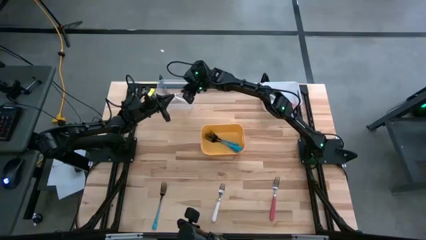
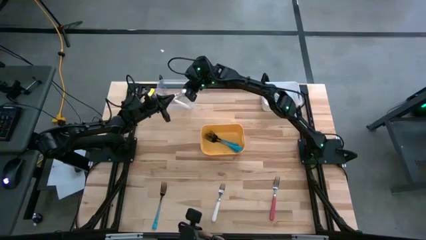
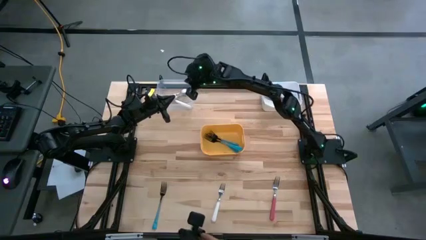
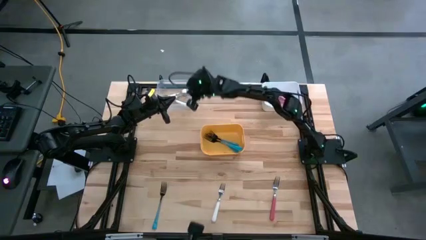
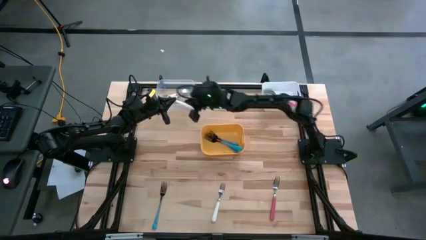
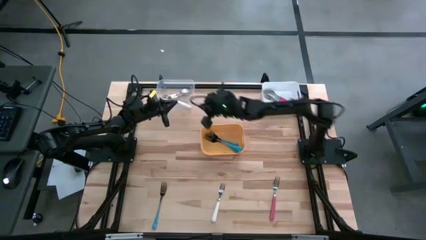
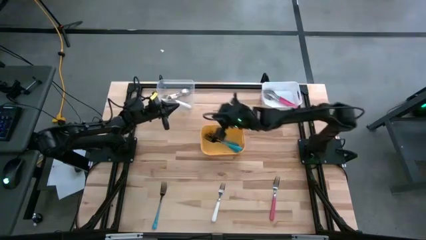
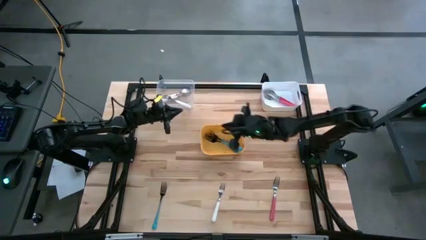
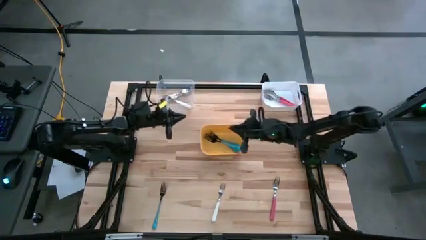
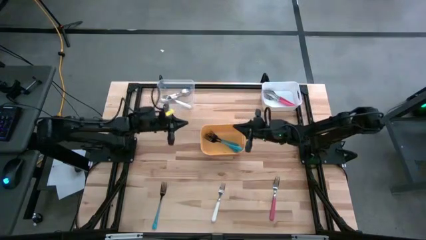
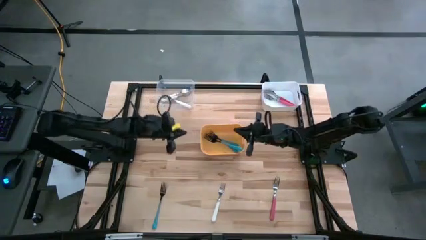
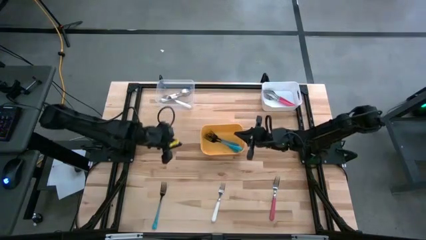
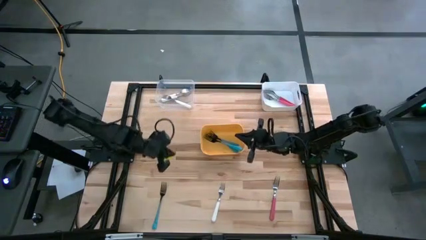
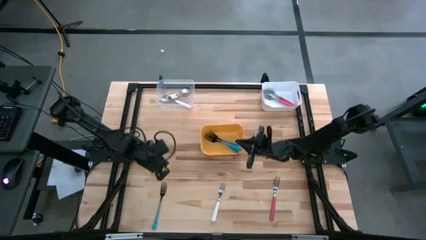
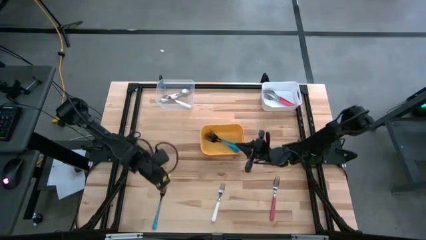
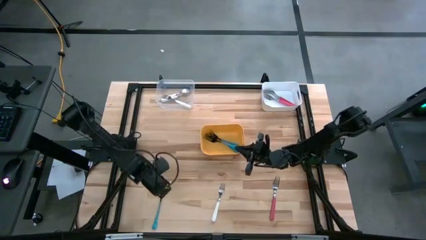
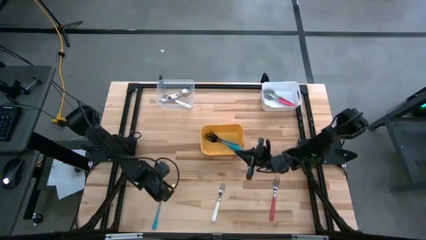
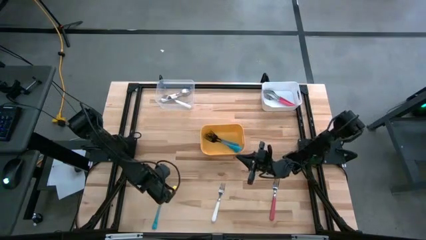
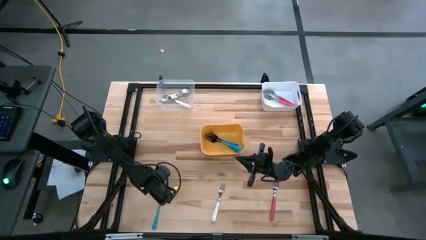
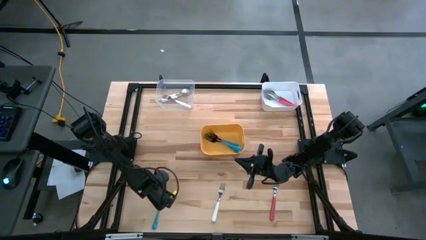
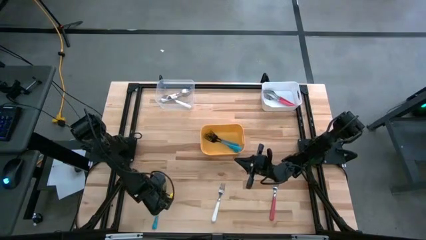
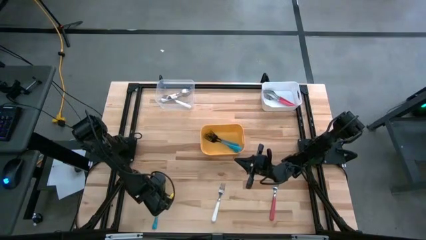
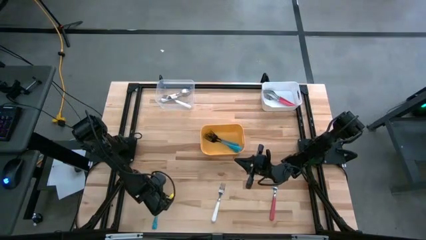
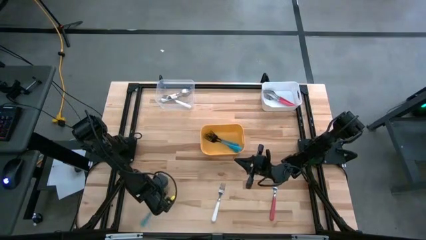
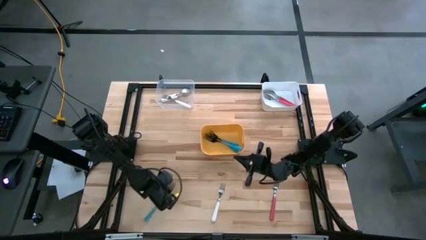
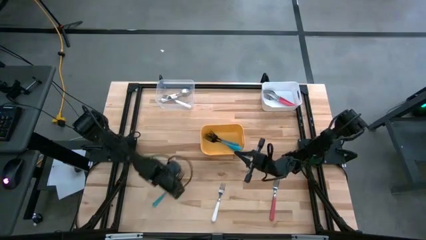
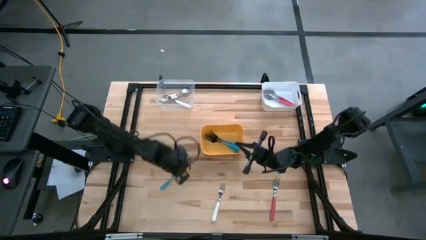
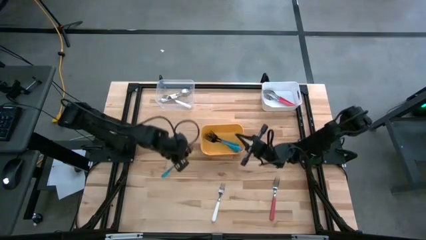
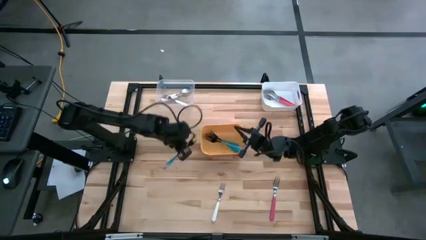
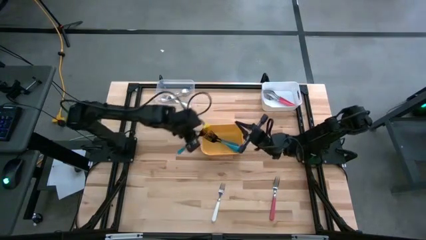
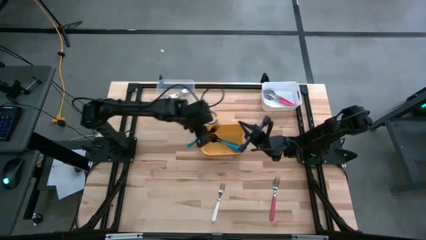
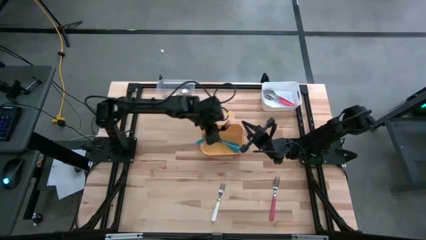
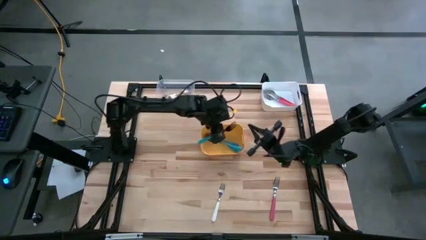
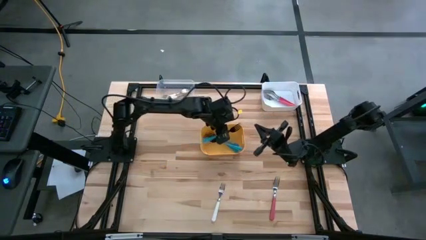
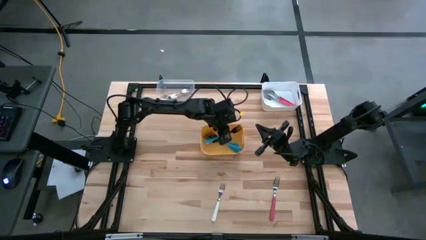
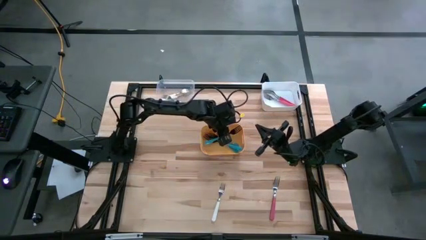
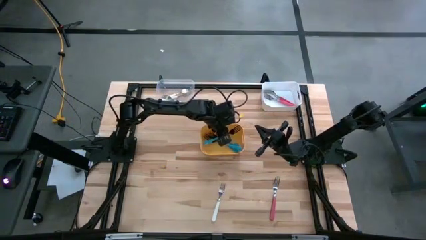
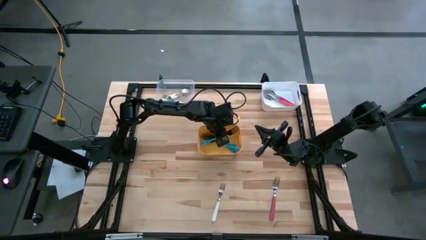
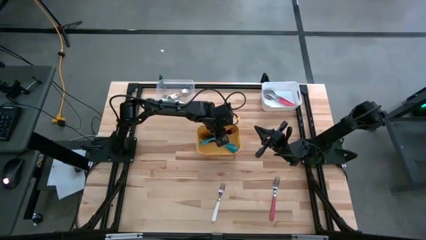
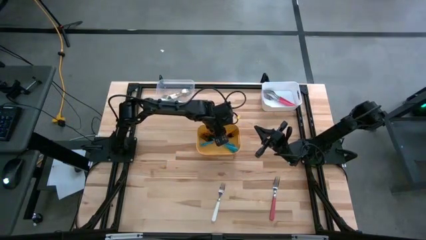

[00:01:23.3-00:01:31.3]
Task: Sort silverware by color (type)
Put the blue fork into the yellow bin

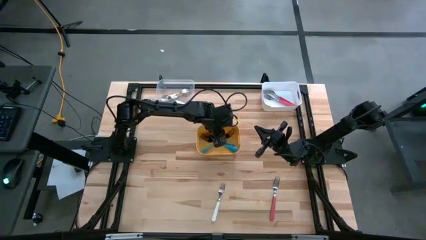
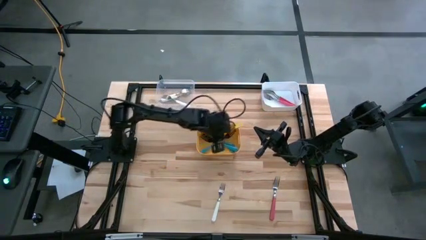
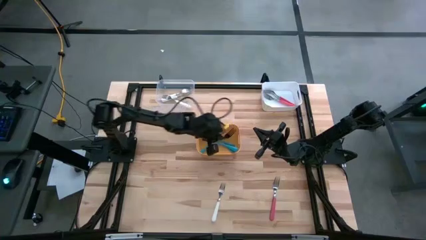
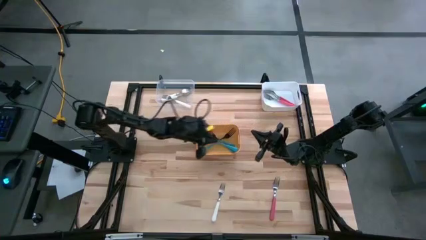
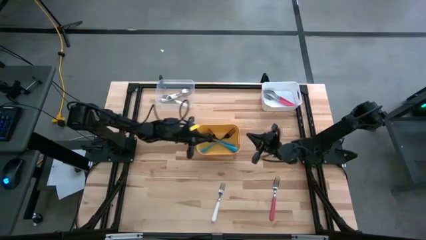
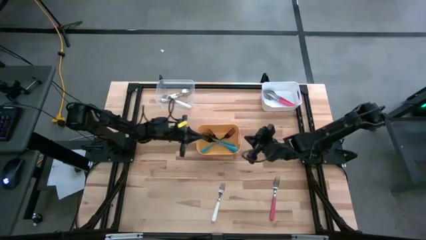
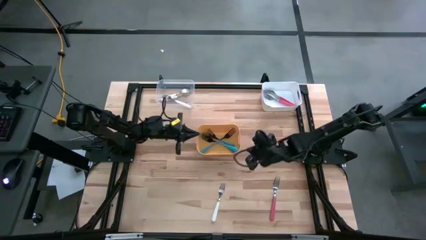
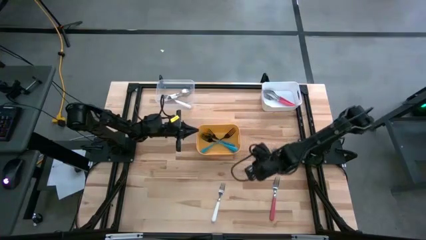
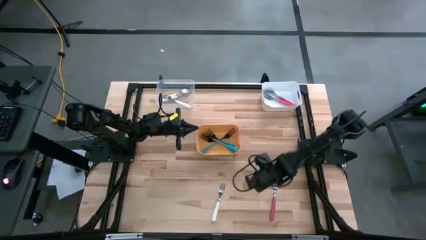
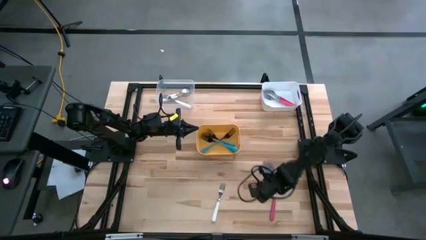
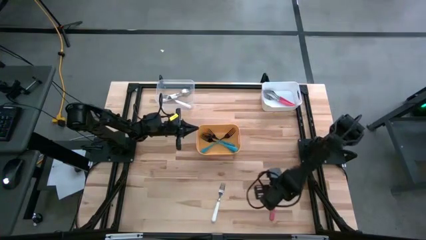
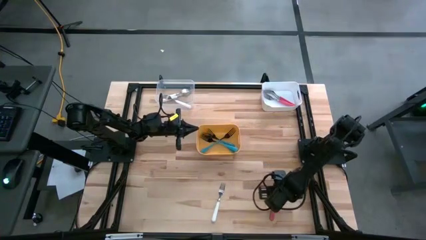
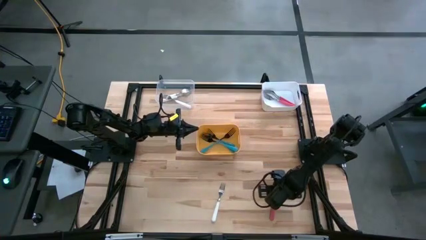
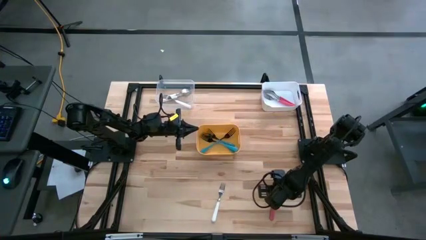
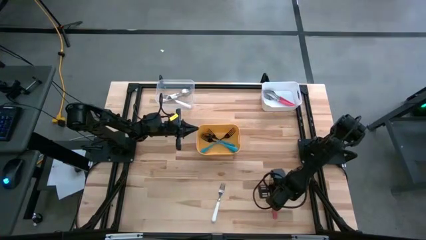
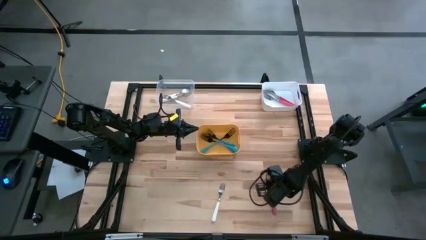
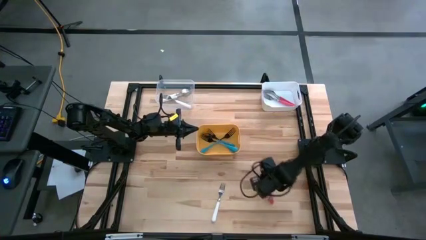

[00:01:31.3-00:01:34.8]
Put the pink fork into the white bin

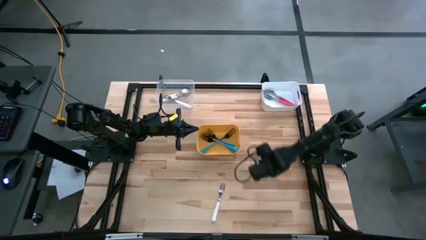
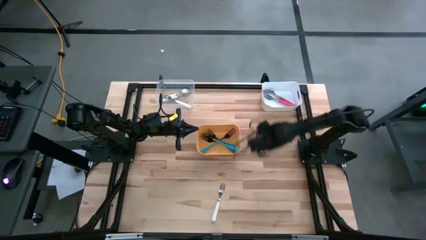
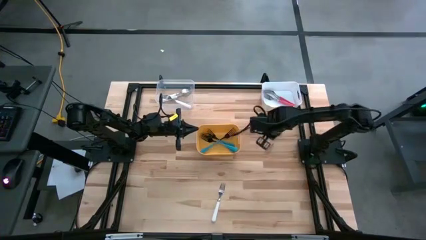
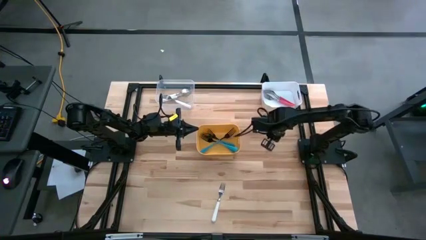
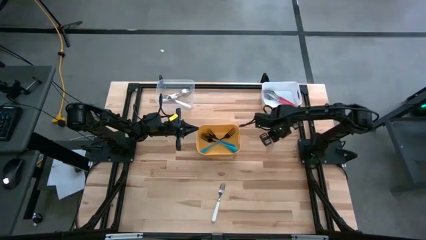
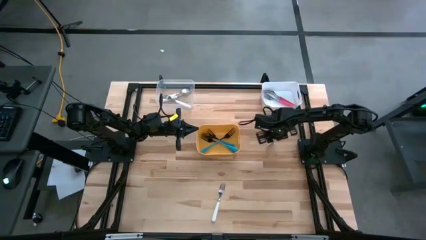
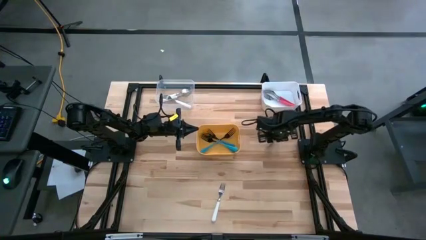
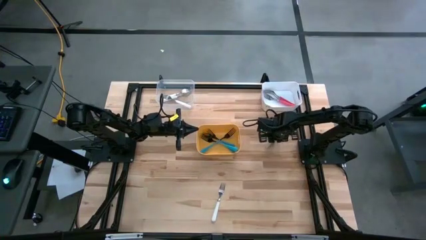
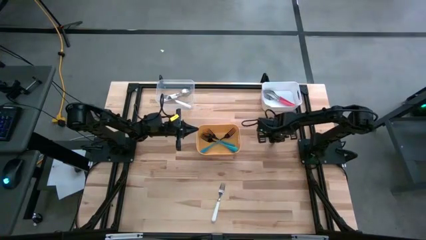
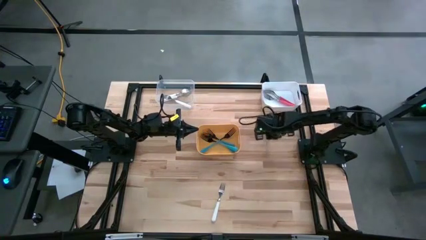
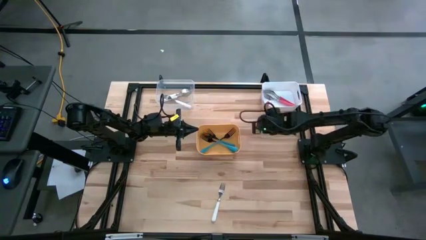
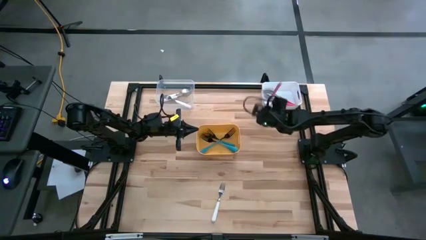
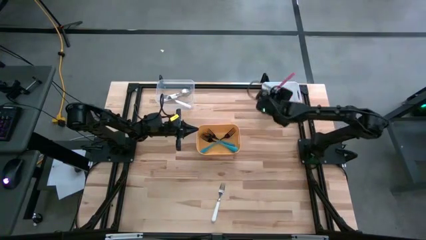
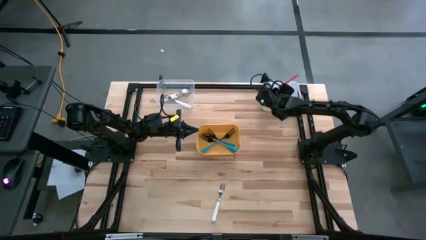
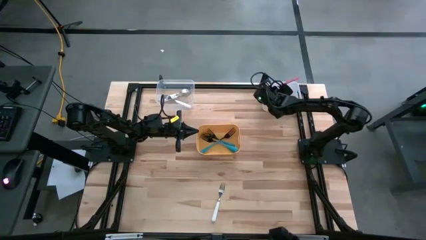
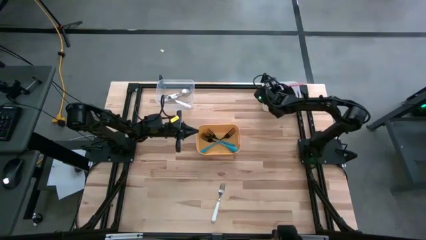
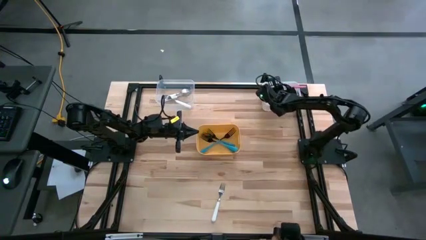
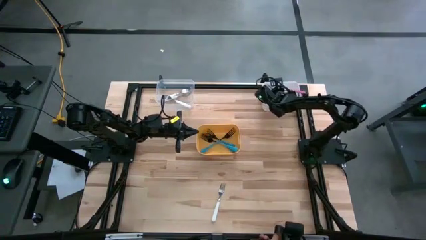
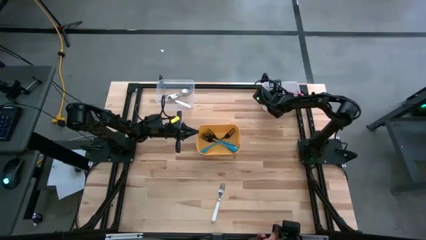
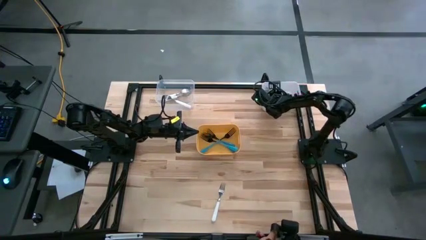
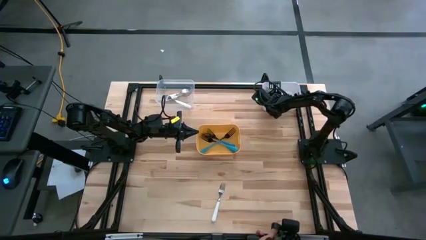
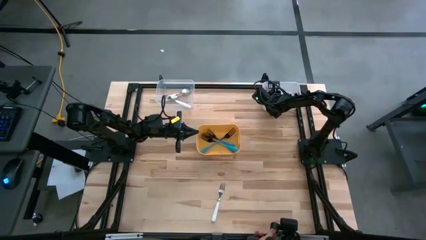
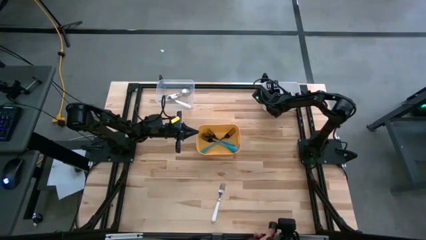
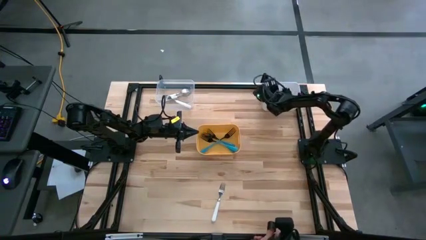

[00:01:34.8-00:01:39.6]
Put the pink fork into the white bin
